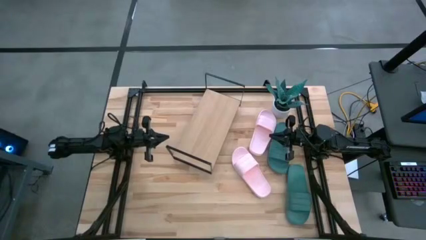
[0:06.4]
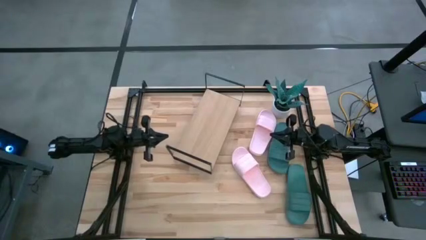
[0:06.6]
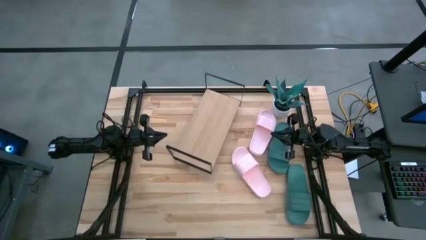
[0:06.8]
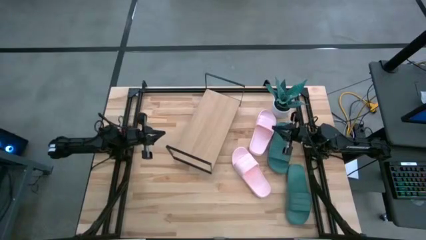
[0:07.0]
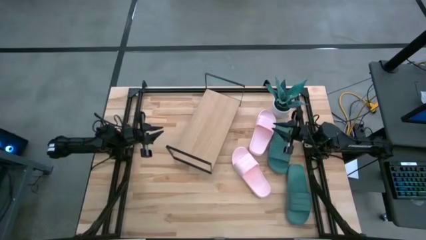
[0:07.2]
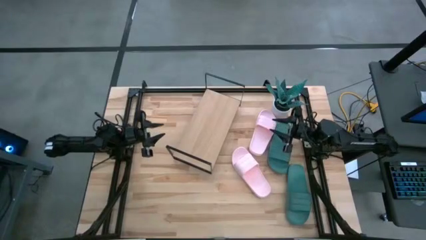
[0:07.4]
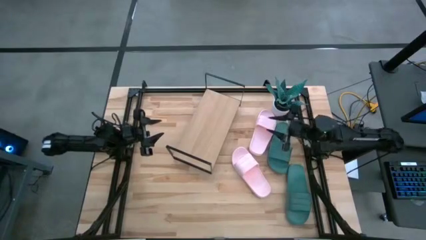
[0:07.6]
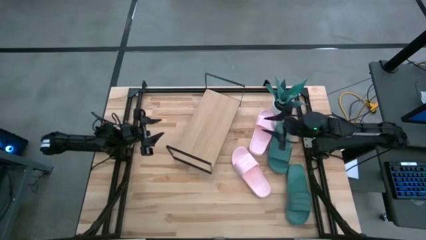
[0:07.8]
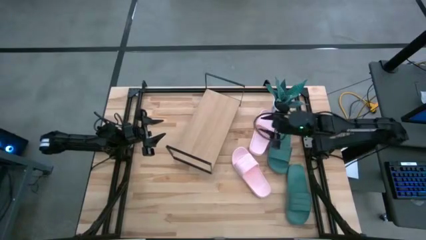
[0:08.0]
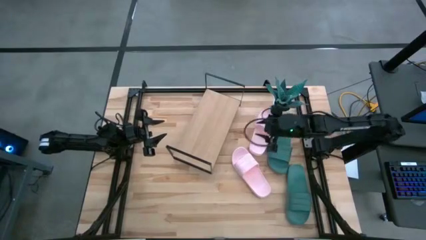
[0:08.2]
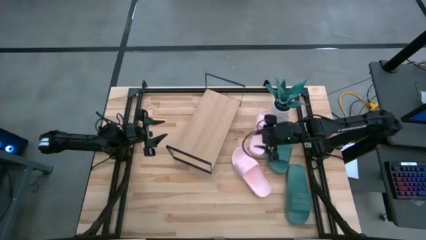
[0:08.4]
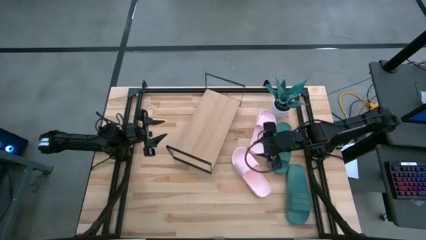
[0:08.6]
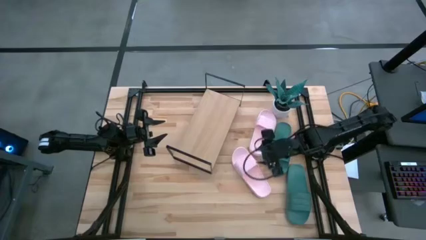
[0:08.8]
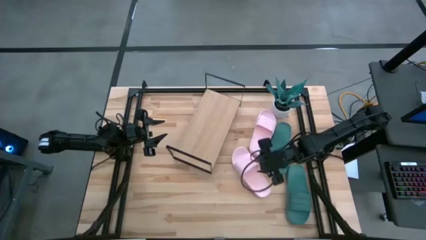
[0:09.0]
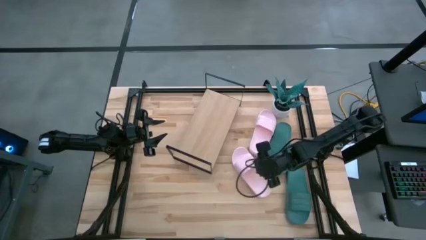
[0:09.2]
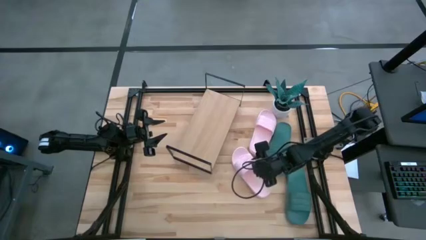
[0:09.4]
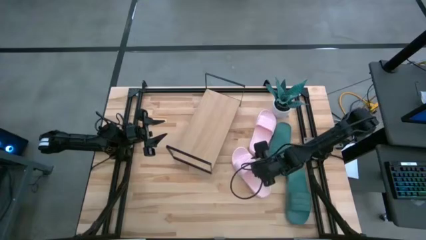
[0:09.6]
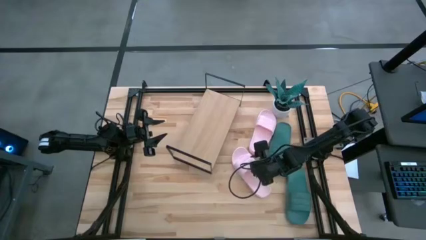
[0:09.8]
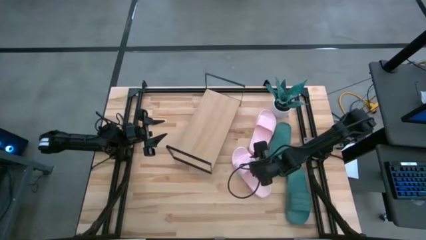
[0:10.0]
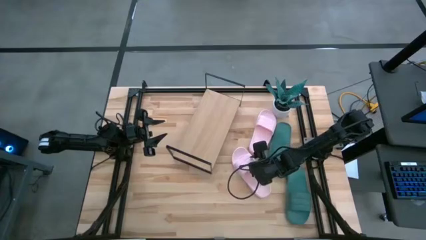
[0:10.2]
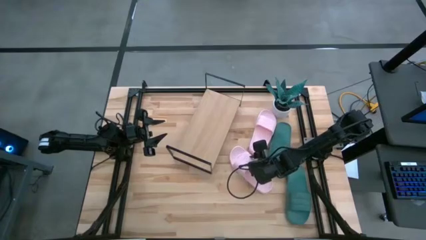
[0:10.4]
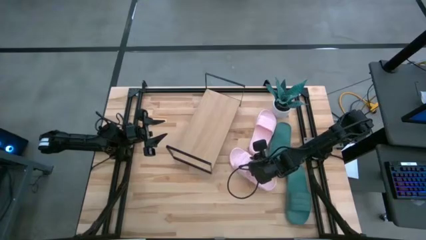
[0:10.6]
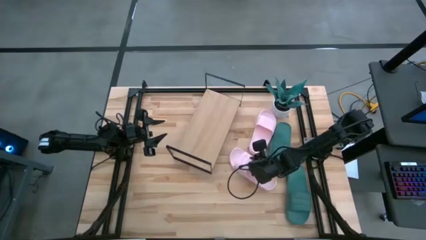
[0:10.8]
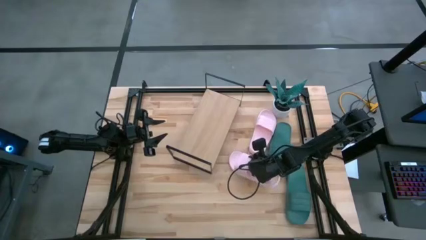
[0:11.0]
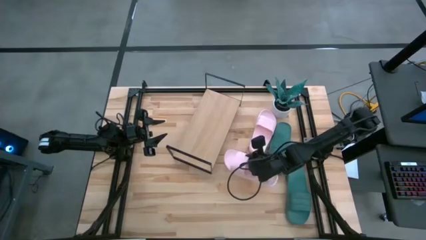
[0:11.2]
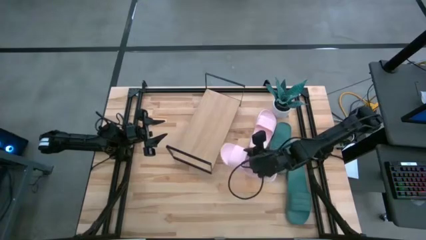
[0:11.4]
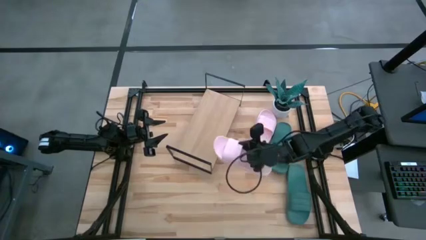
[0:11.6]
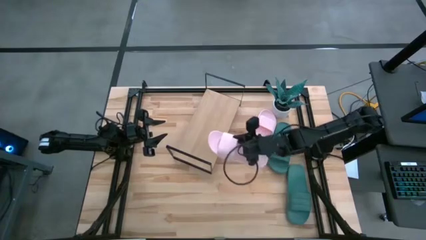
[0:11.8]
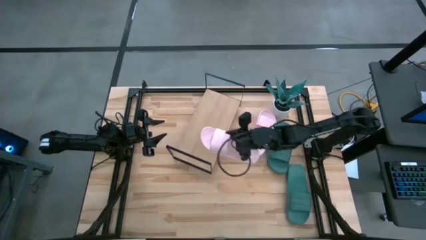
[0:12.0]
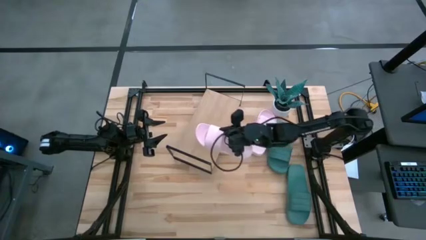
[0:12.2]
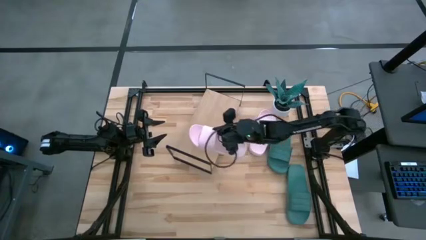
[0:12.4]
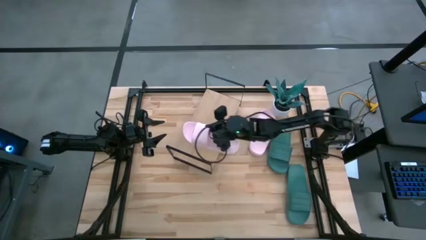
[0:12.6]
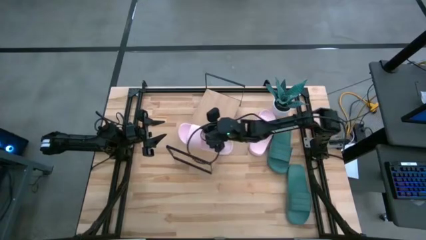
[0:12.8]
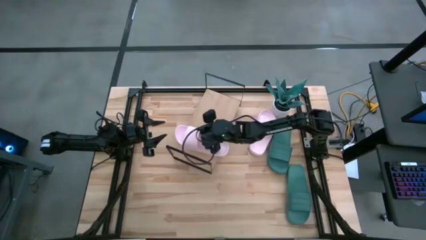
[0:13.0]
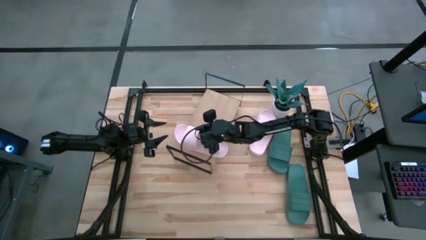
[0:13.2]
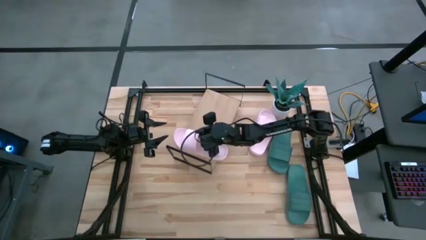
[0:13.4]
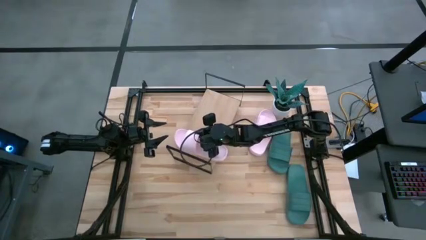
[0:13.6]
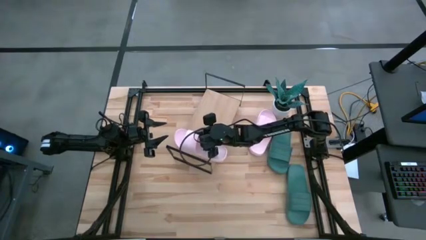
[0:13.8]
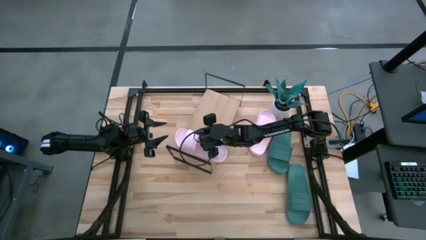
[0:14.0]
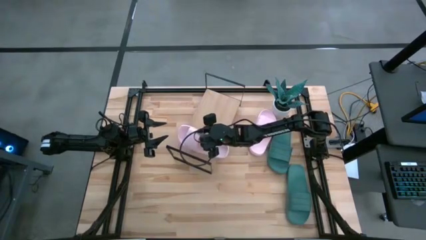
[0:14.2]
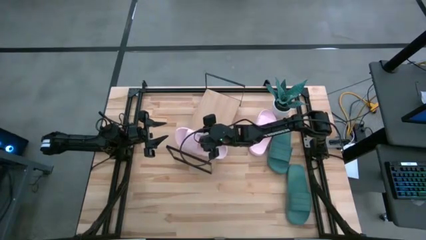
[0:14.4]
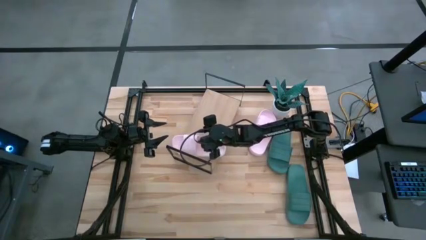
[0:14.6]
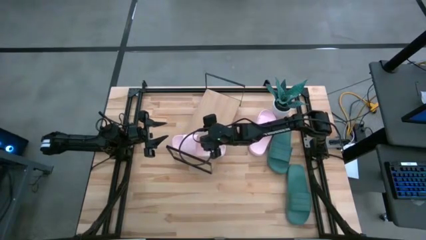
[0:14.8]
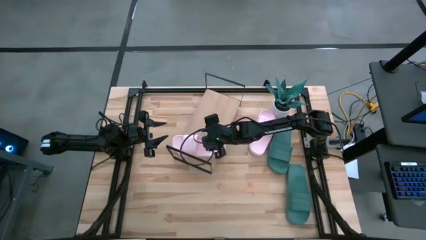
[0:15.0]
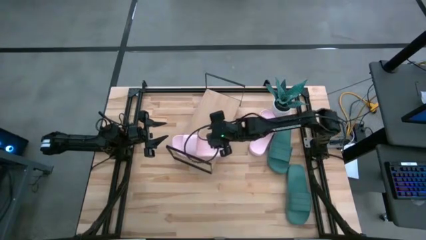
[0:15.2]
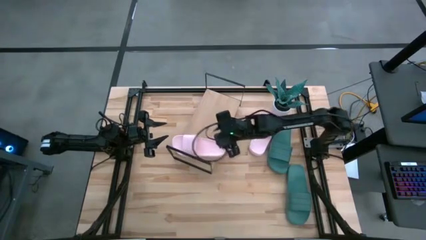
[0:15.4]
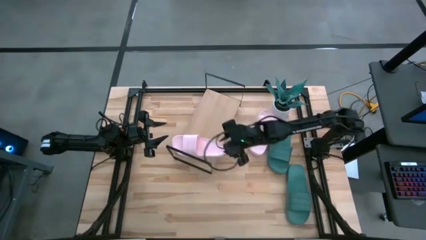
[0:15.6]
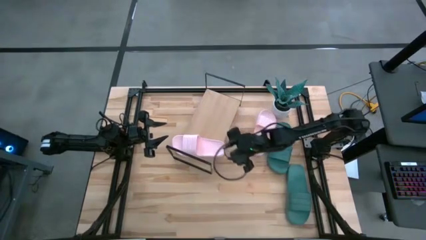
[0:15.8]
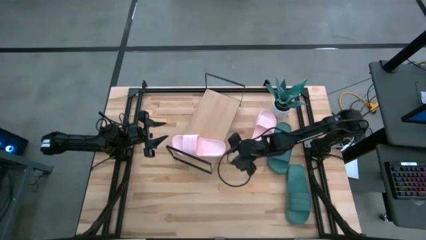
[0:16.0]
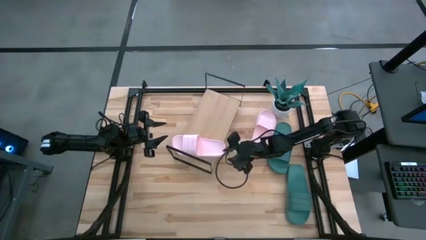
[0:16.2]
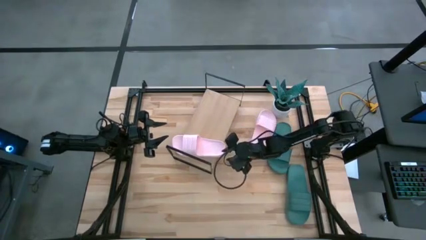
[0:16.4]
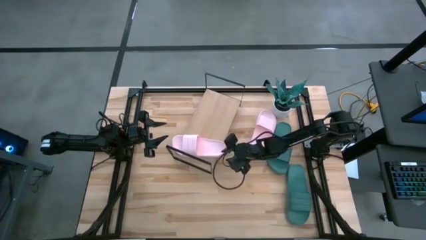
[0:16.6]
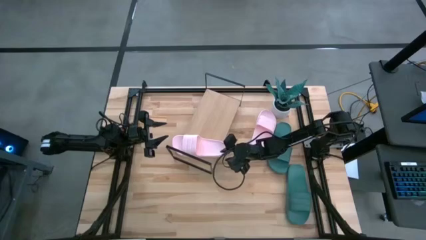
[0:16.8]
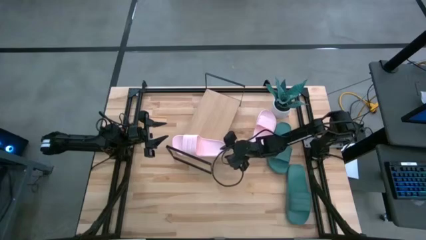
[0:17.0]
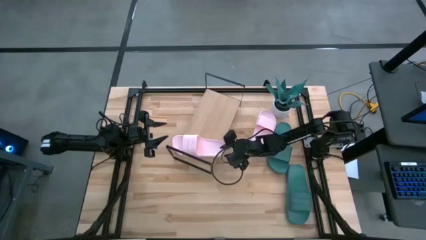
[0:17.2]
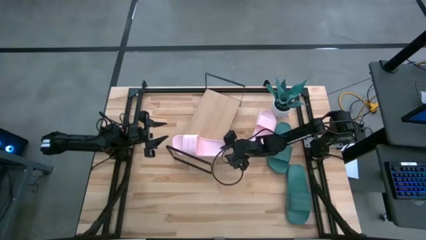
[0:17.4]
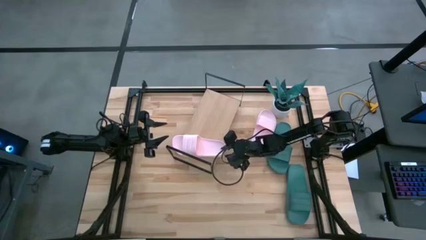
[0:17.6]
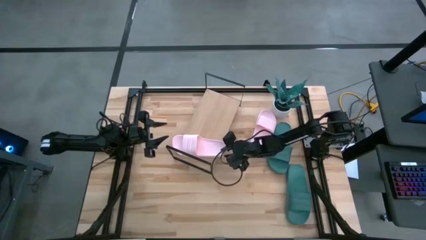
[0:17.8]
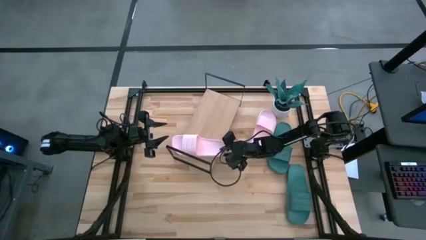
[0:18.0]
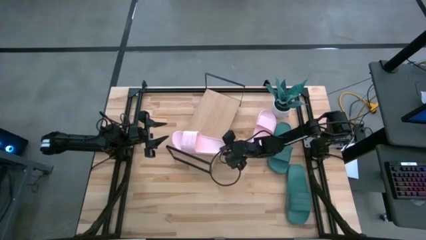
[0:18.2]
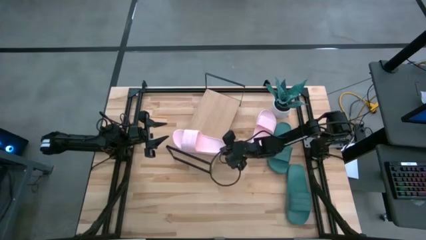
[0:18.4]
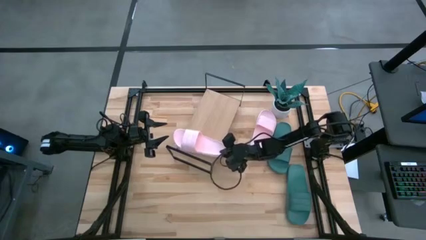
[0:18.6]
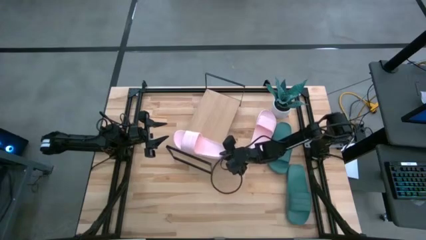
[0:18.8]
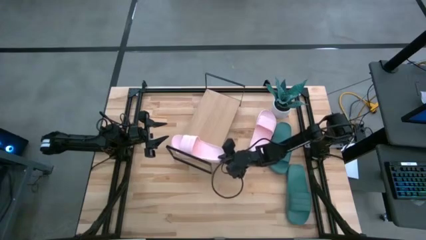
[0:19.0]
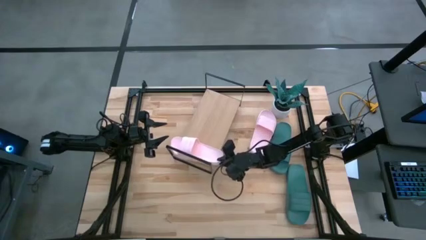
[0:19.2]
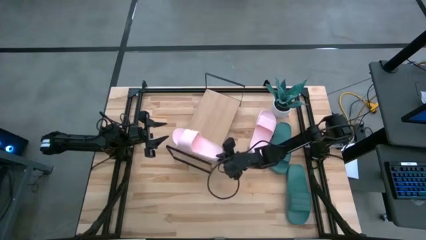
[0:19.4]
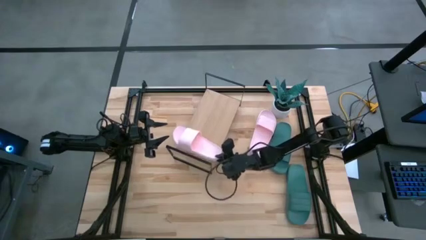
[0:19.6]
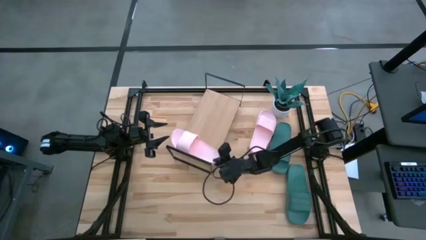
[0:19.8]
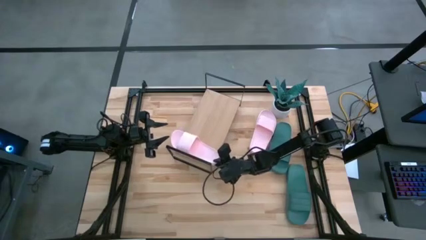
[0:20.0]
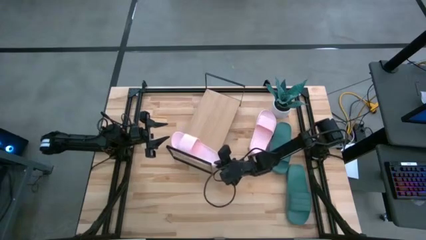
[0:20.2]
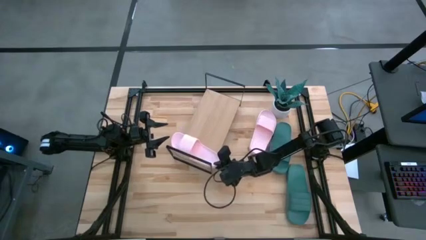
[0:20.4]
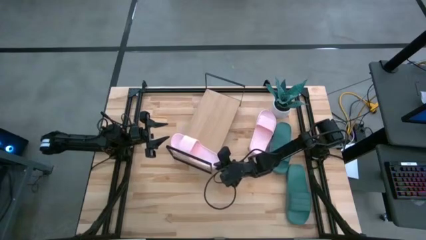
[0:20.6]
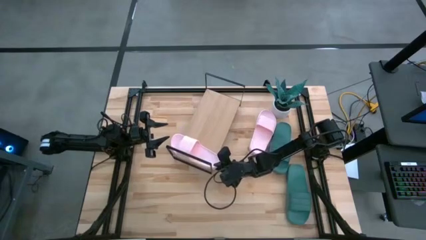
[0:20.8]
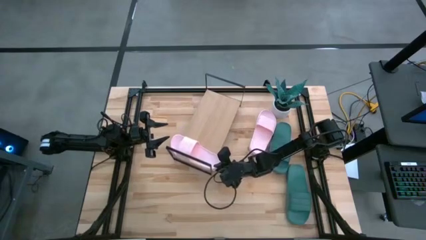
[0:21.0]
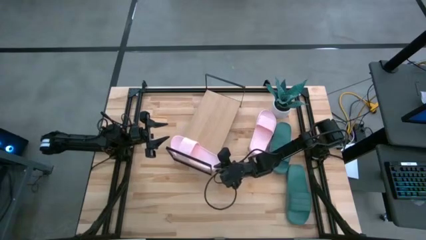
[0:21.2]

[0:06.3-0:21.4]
Task: Pick and place slides into the shelf
Put the bottom pink slide on the shelf
